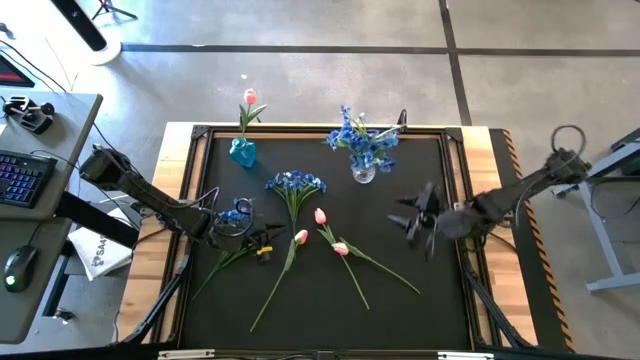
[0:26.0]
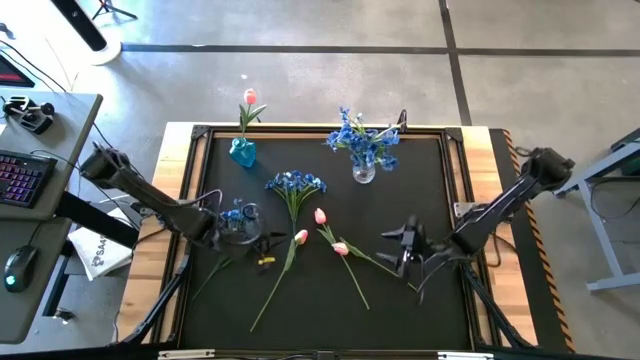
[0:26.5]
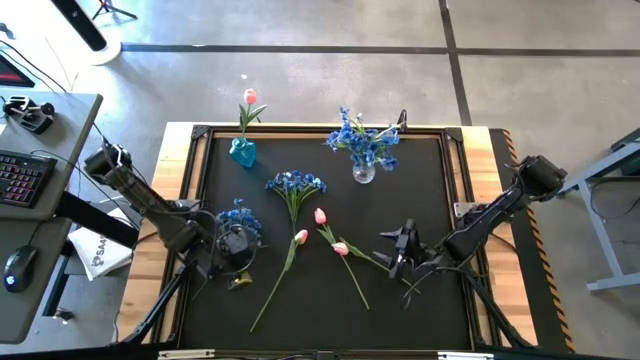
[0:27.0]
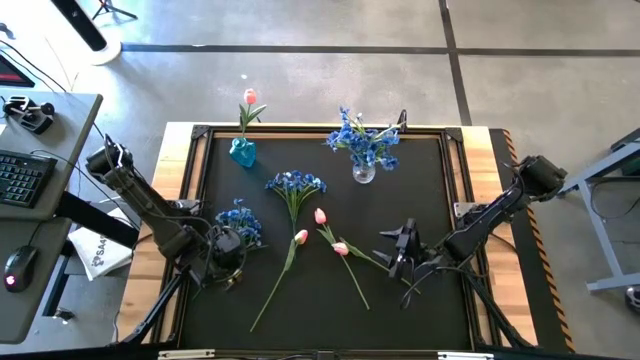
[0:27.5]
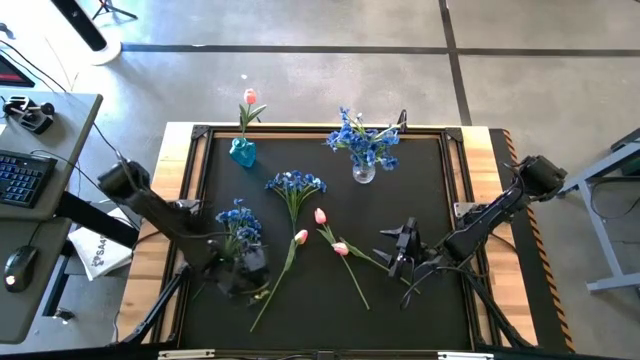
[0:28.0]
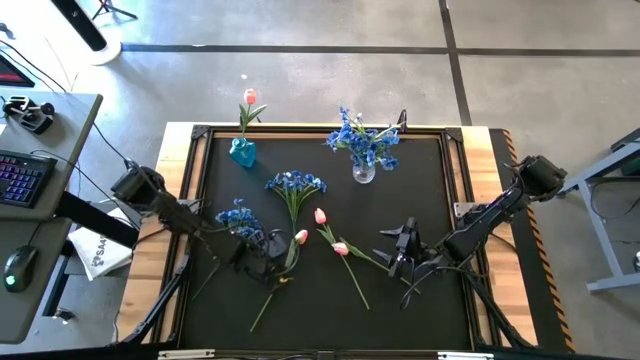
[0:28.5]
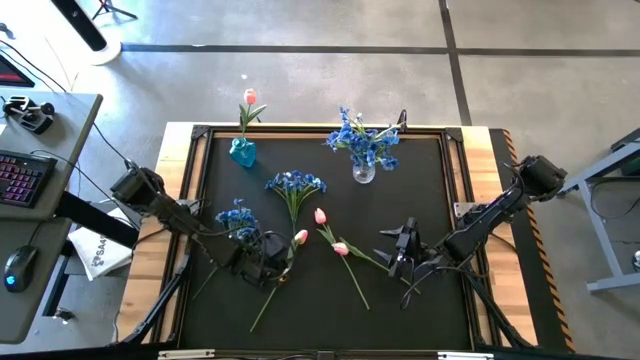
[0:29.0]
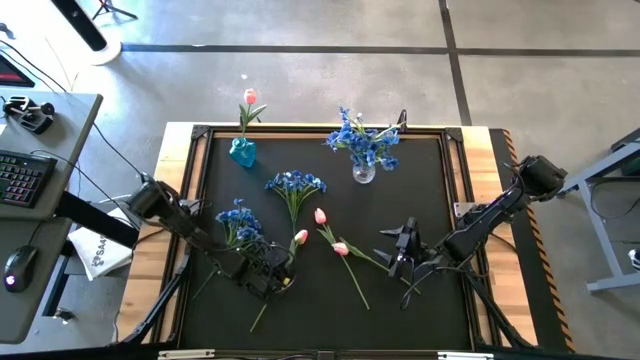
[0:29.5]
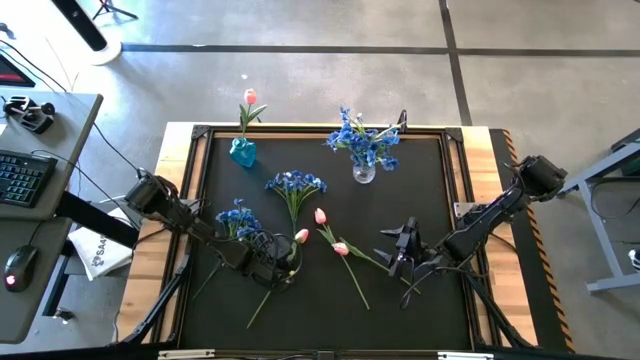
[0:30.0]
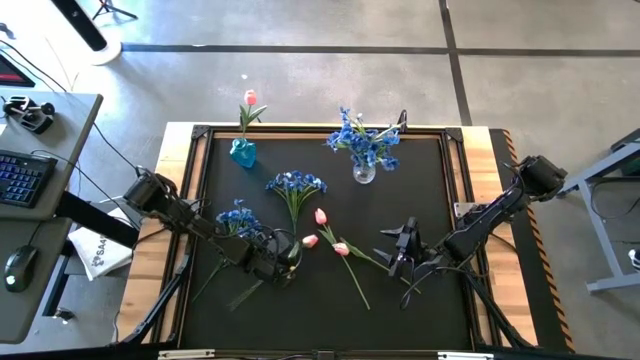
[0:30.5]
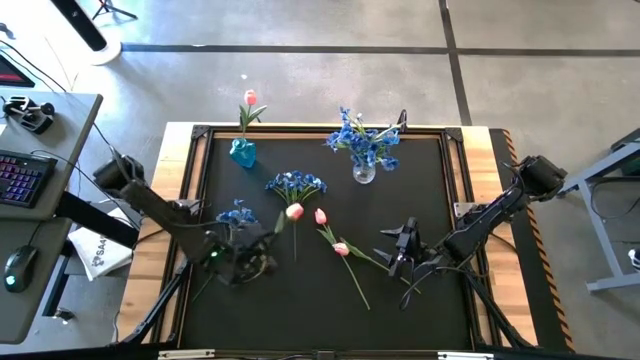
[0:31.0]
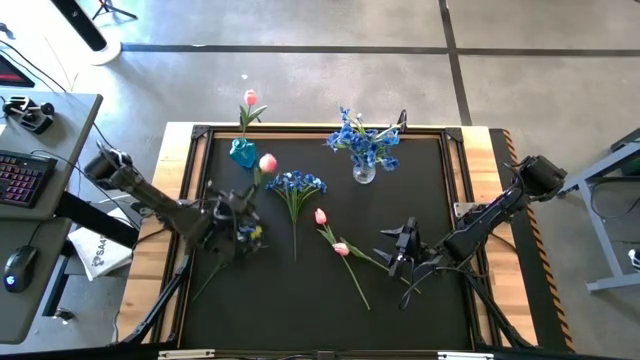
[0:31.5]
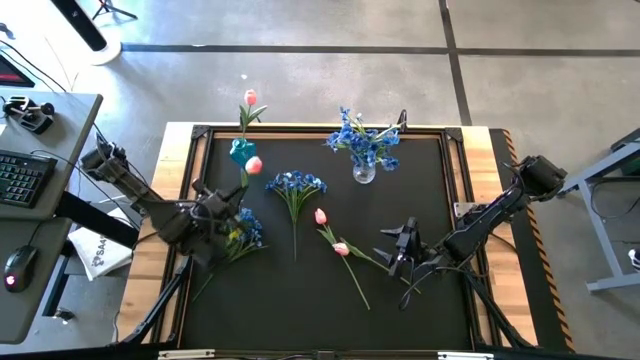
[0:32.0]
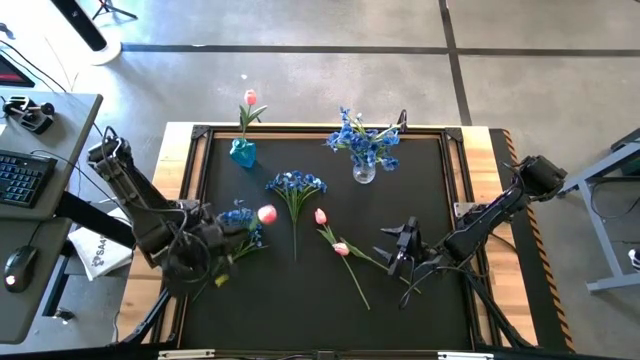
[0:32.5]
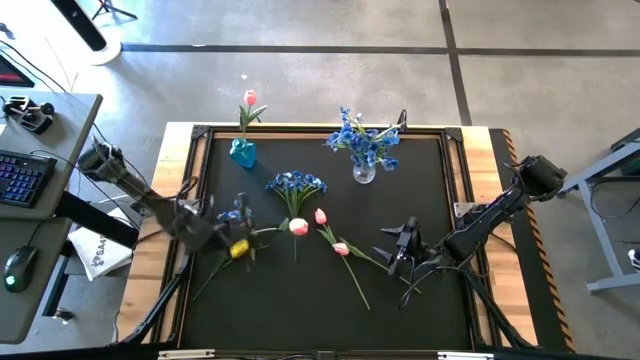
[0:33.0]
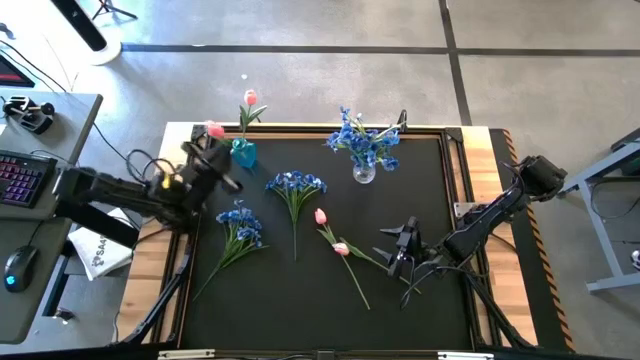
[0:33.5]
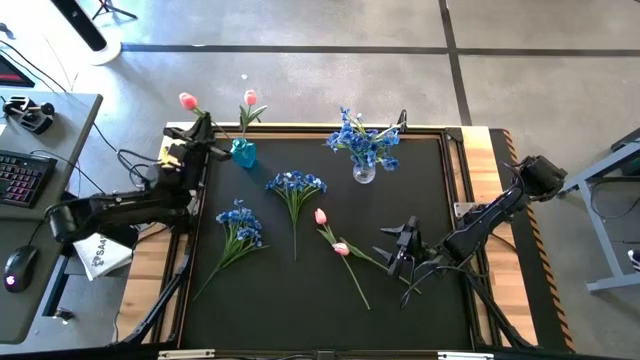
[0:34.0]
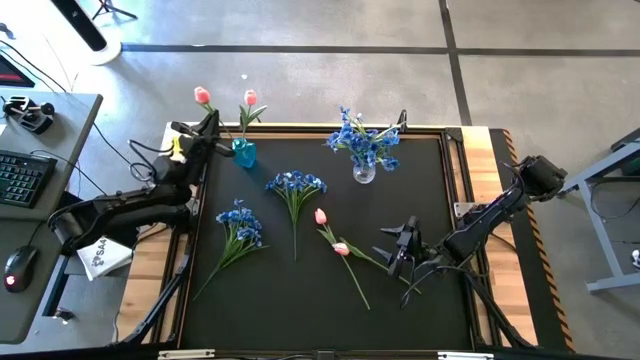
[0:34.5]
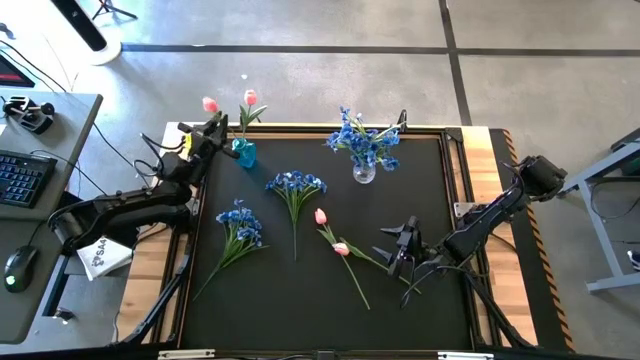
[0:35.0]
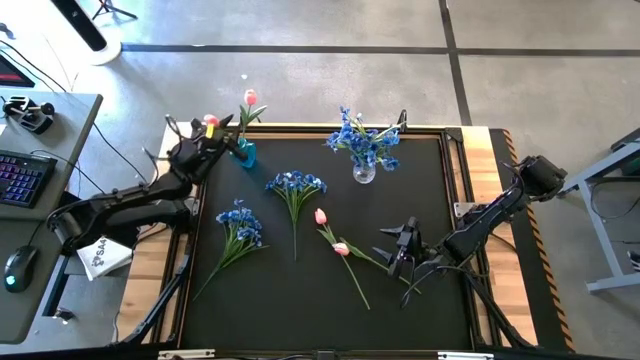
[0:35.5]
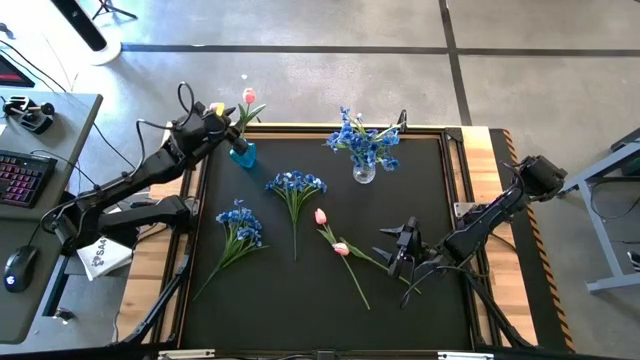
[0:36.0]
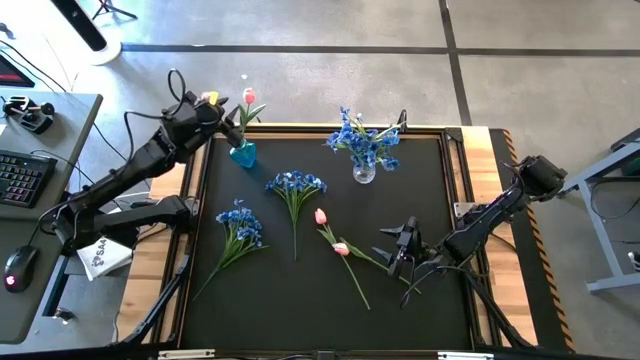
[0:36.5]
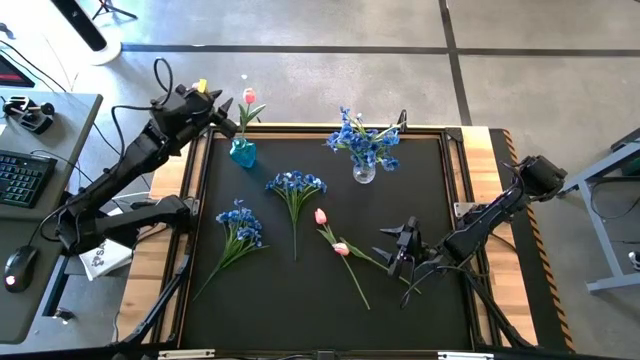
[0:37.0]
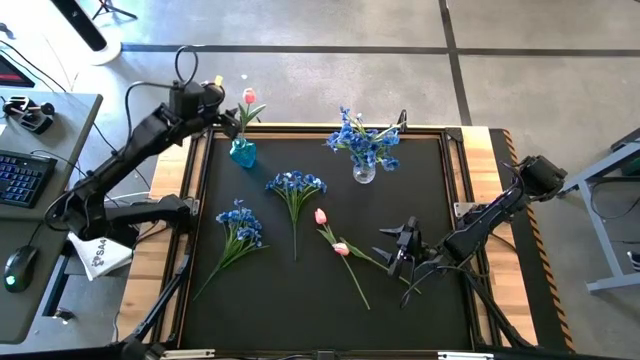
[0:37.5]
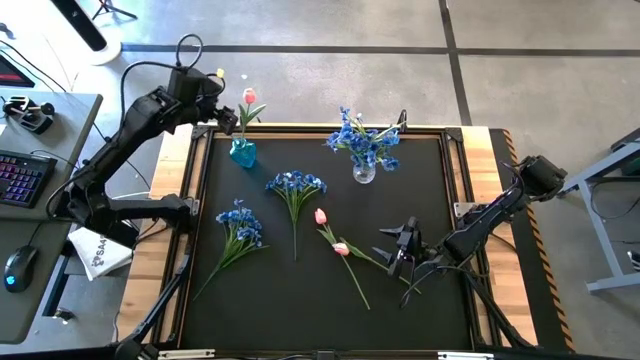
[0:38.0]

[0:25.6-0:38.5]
Task: Sort flowers into vase by color
Put the left pink flower into the blue vase

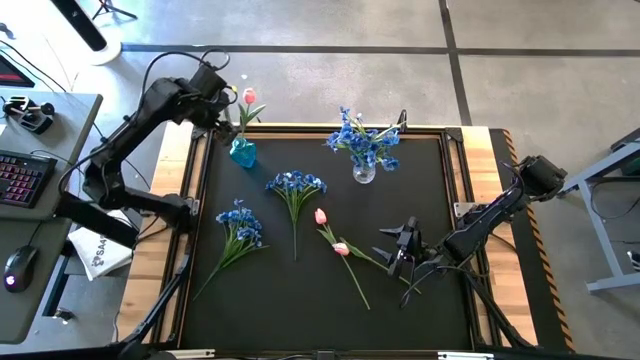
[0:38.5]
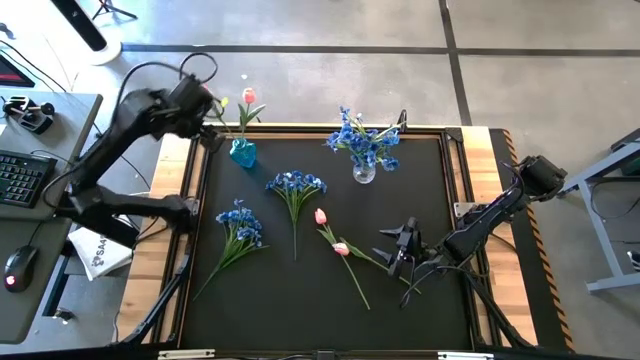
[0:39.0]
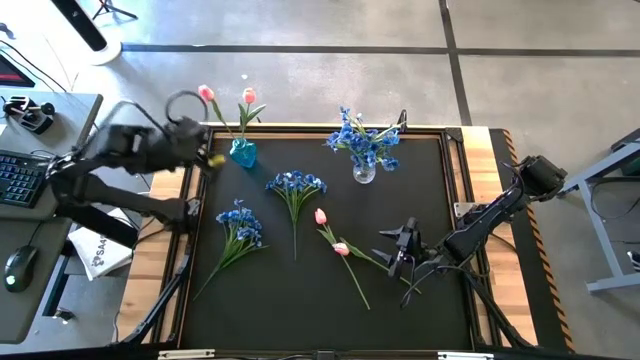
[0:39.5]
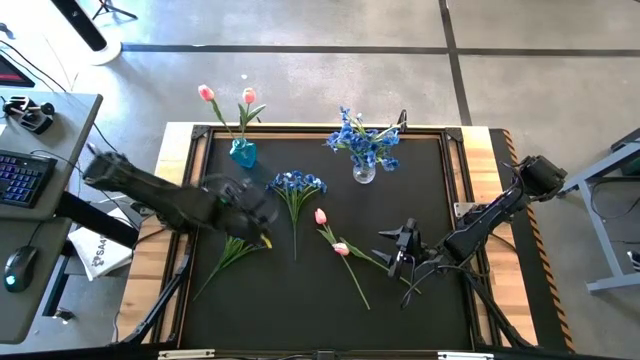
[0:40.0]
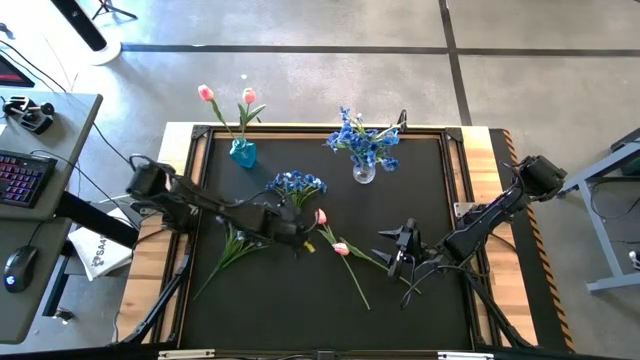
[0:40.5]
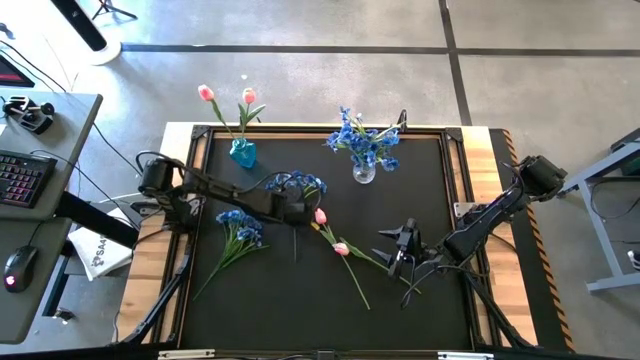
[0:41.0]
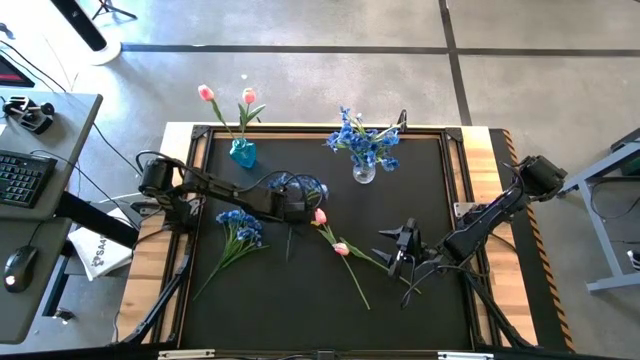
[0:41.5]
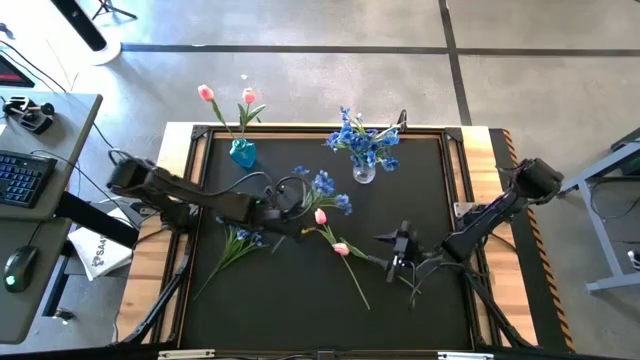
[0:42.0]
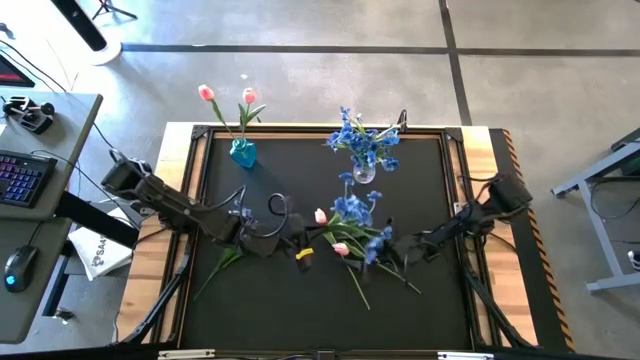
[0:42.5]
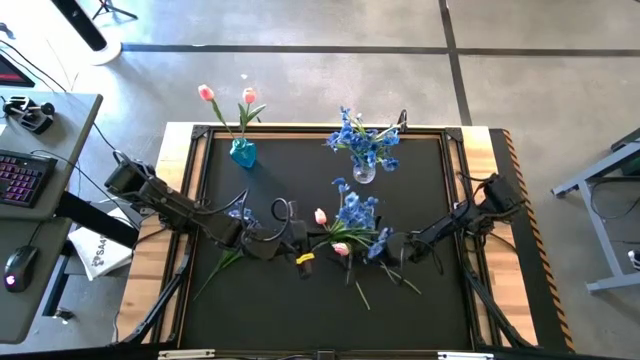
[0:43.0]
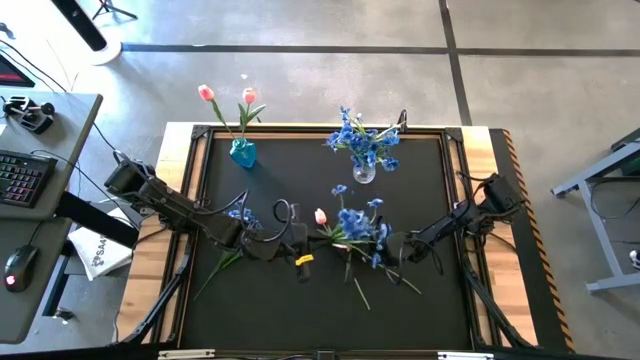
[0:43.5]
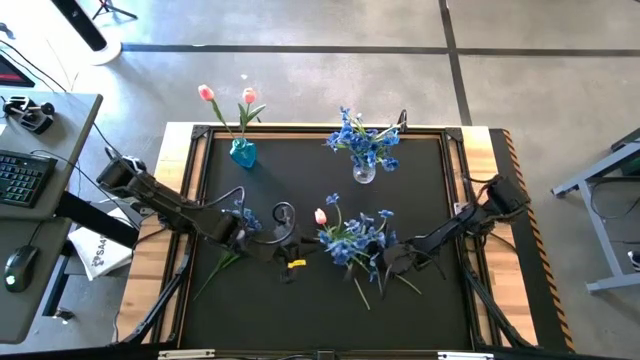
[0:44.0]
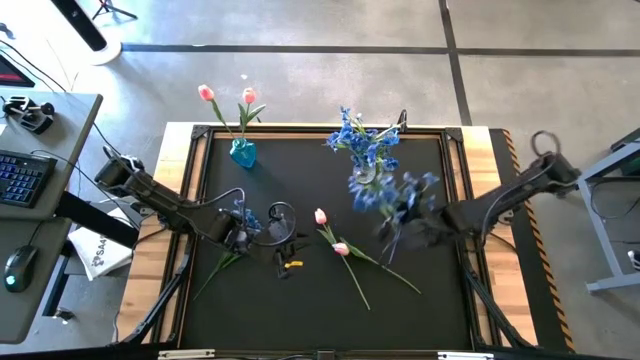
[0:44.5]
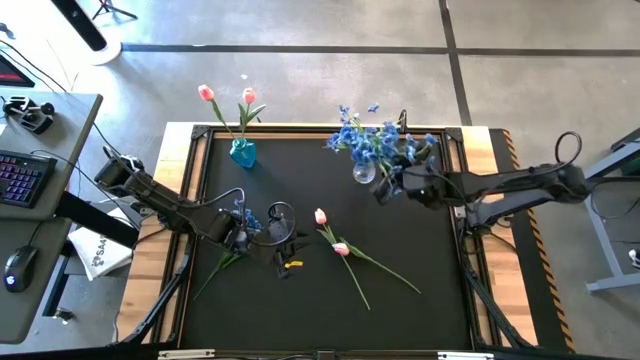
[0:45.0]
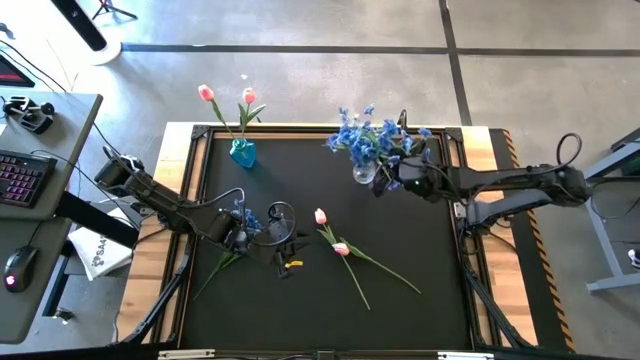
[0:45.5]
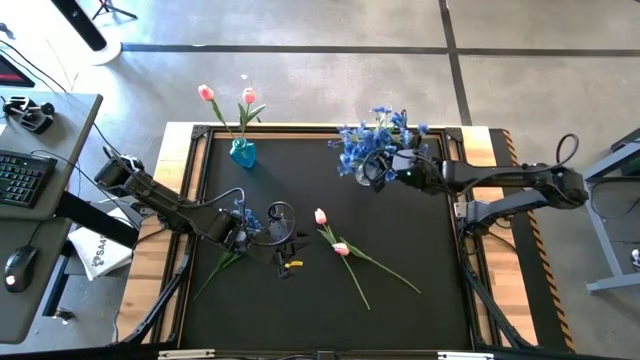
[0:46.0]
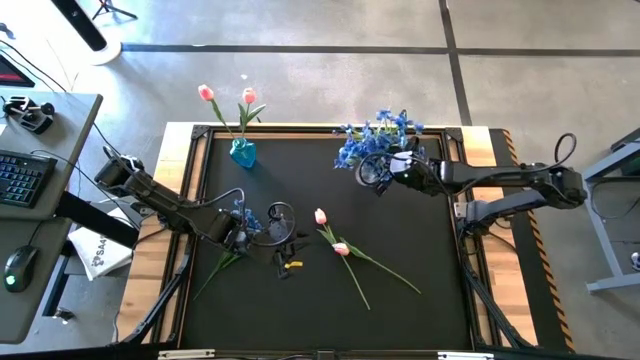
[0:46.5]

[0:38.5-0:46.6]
Put the top blue flower into the transparent vase
